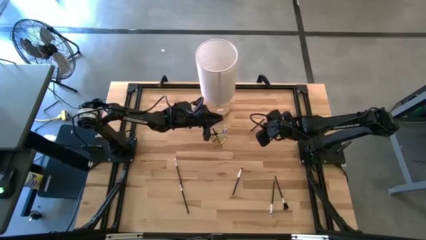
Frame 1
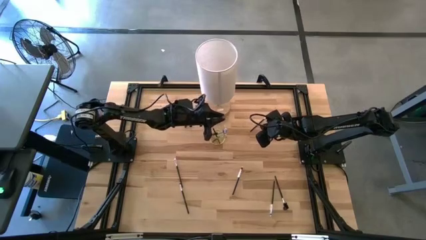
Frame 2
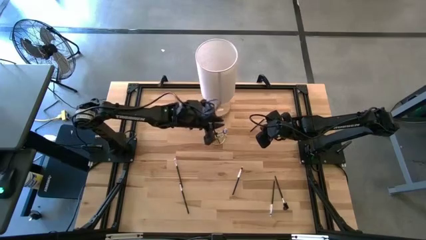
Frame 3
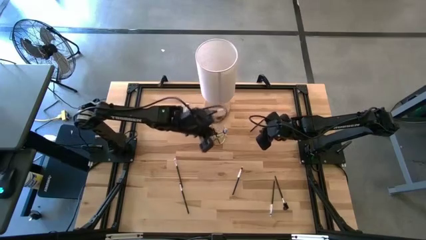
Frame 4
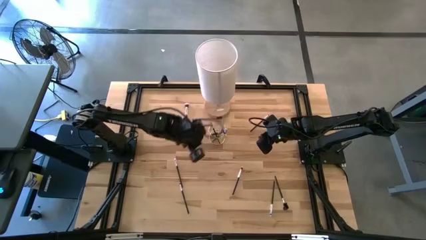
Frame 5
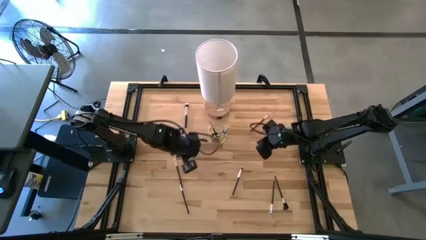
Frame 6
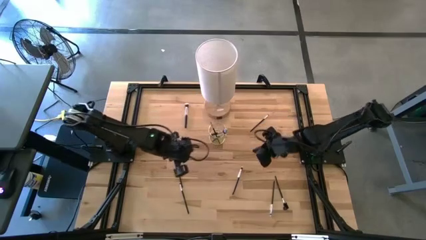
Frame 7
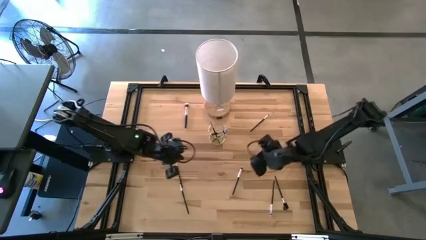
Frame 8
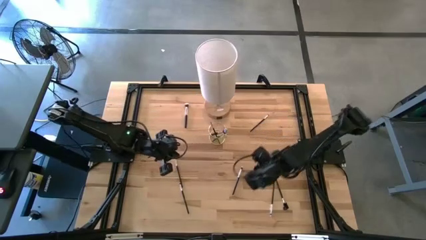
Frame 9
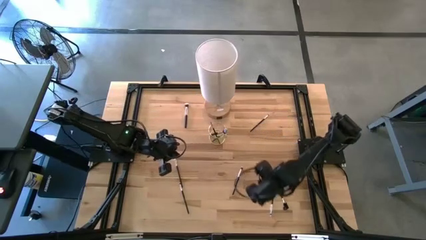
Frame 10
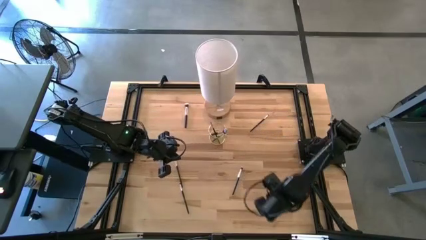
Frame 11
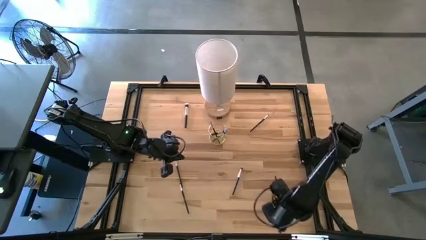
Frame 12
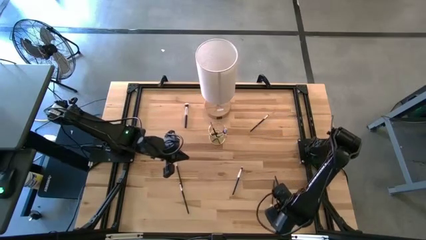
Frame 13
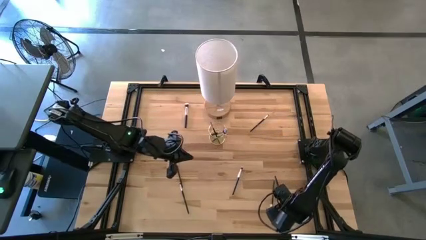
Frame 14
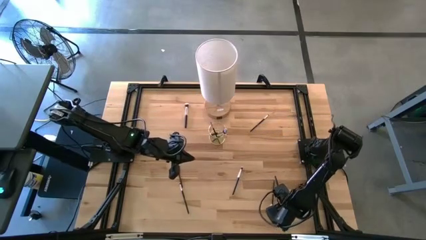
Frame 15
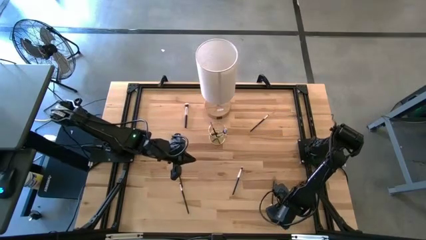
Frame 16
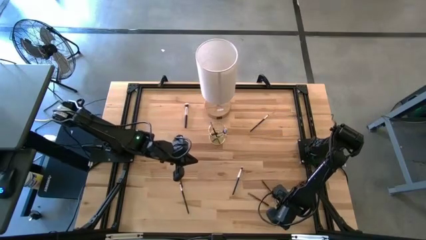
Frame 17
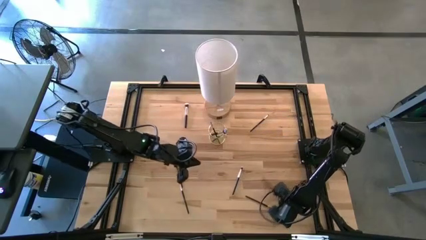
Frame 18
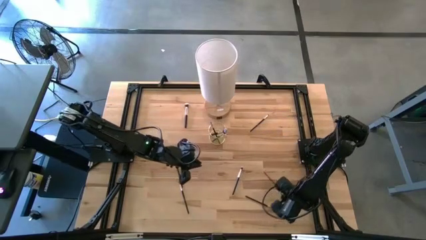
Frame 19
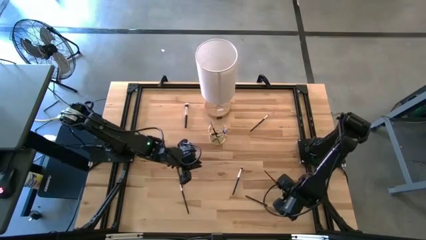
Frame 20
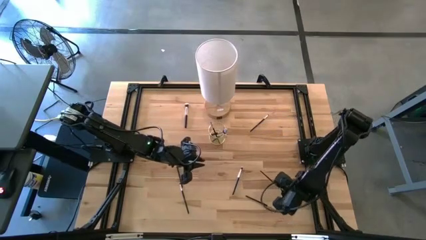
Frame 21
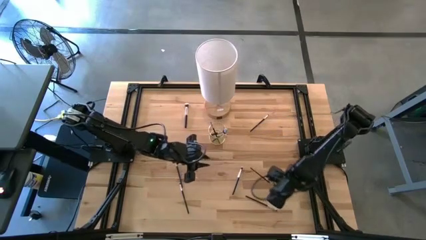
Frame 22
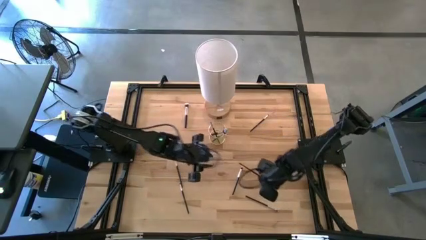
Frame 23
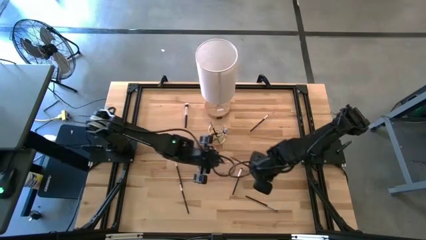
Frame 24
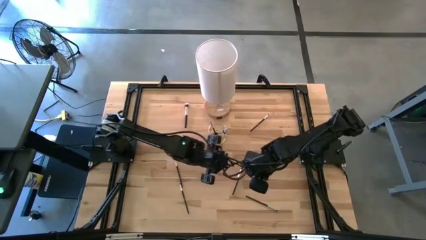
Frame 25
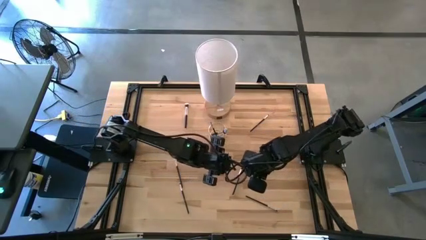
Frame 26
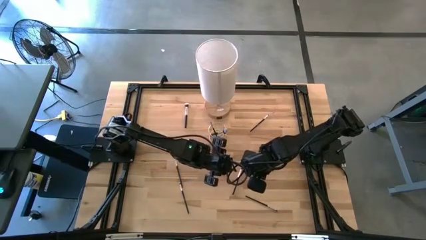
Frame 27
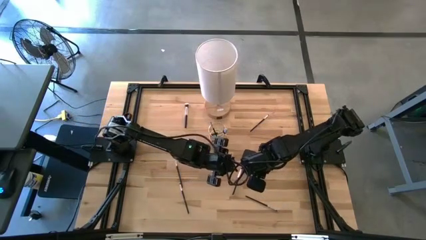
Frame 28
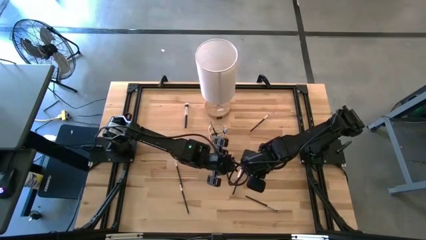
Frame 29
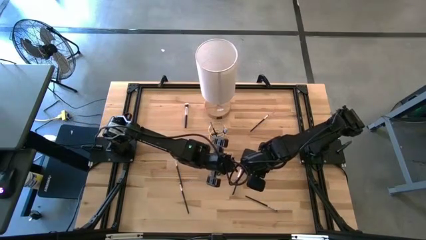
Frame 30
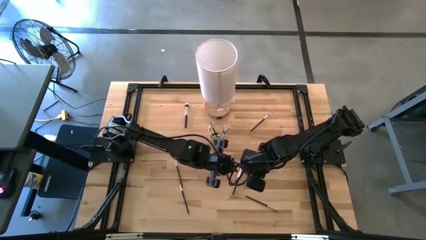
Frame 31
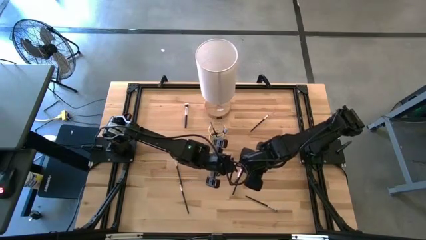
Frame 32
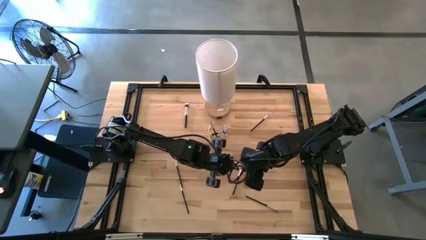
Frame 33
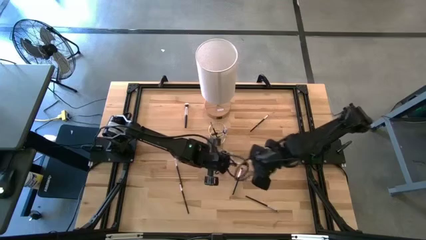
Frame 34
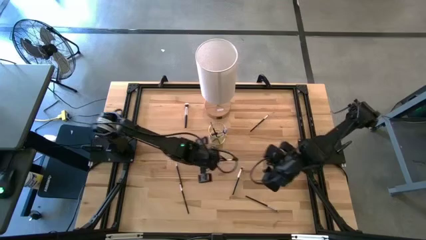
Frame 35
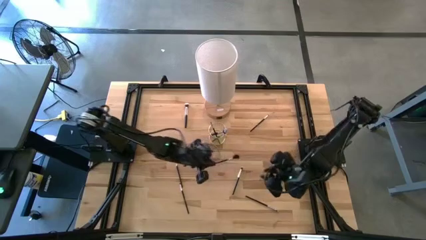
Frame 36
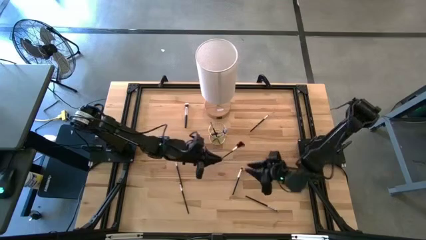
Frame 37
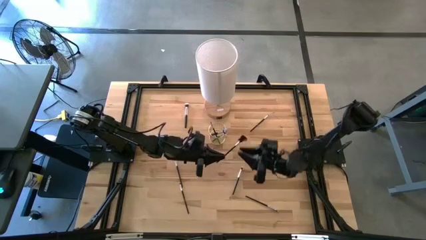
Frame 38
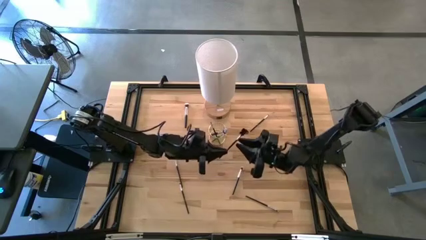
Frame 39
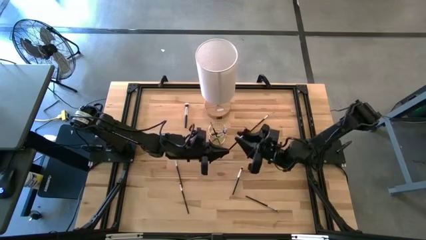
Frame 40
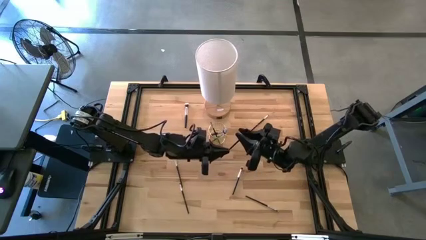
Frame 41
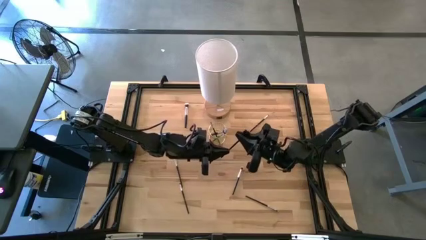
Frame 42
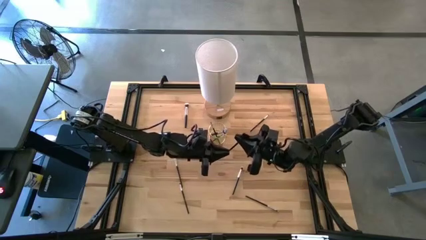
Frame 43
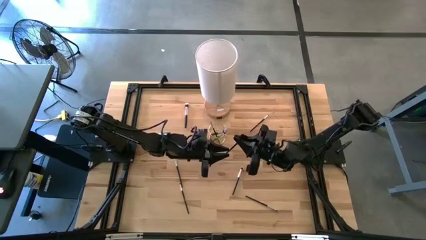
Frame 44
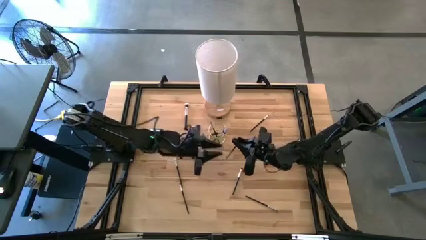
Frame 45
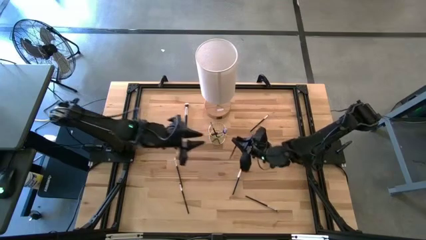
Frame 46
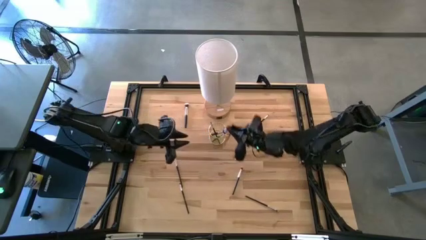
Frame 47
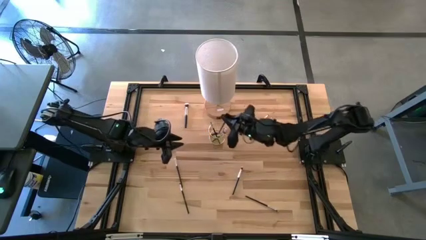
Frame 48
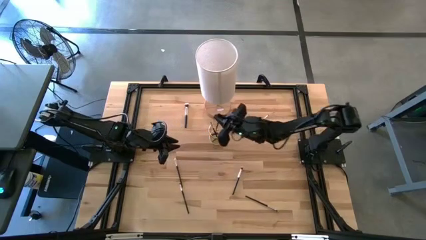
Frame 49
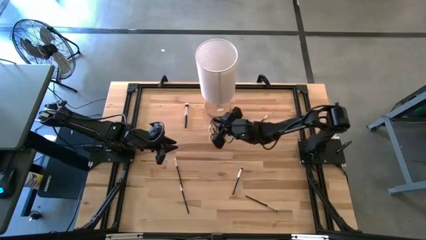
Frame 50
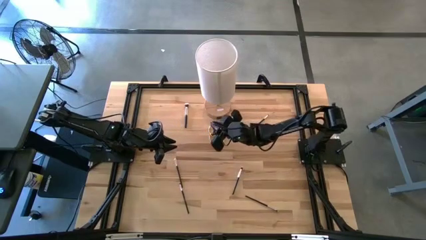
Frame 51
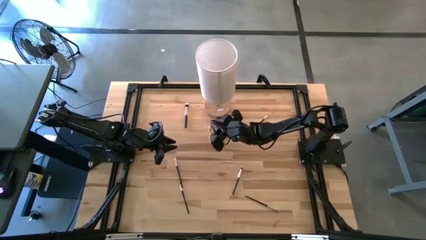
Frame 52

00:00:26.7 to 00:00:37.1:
Task: Put items in baskets/containers
Put the black brow brush into the gold pen organizer

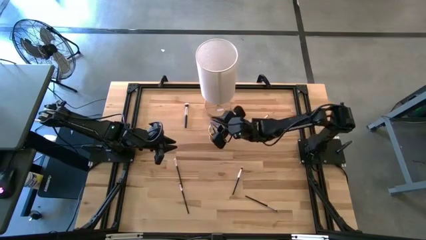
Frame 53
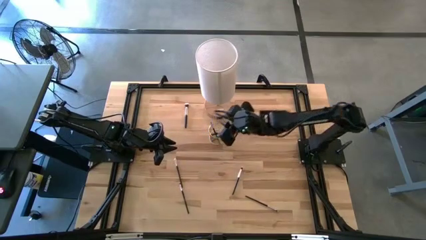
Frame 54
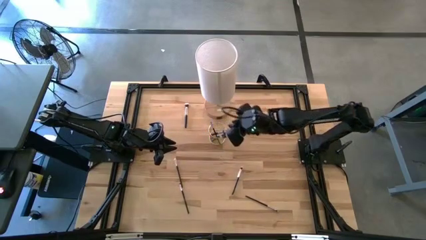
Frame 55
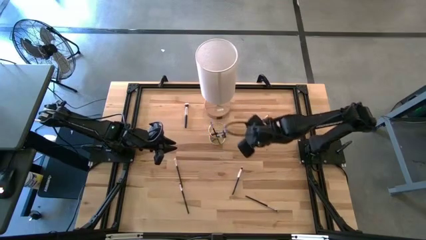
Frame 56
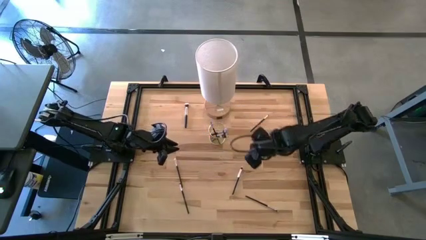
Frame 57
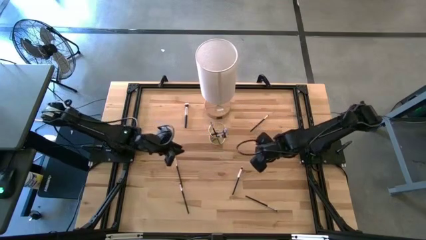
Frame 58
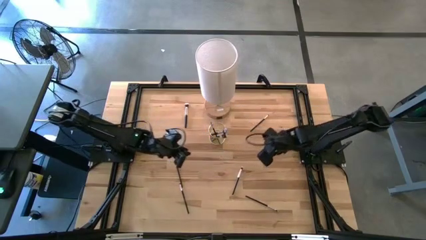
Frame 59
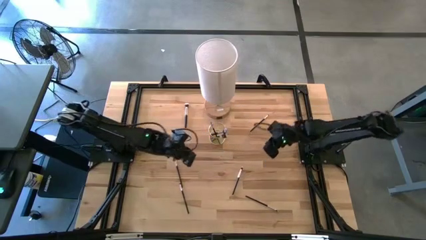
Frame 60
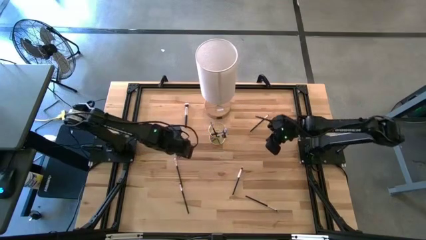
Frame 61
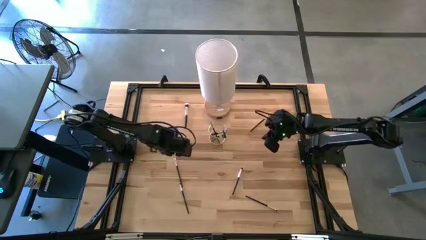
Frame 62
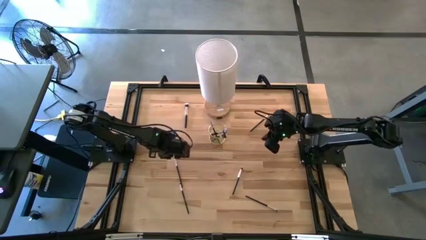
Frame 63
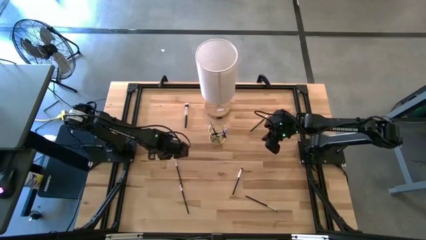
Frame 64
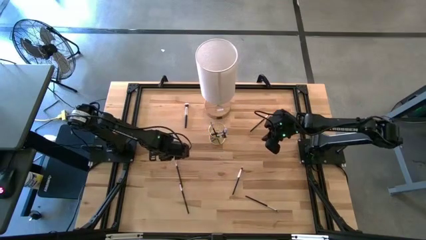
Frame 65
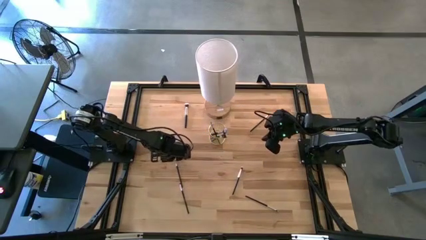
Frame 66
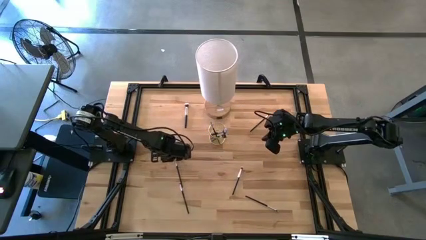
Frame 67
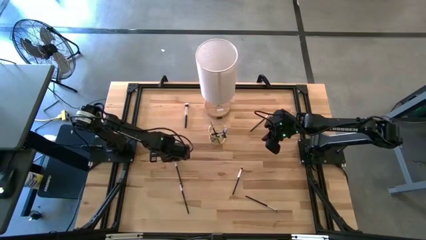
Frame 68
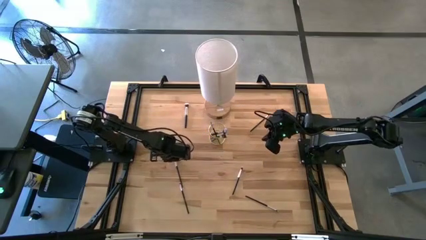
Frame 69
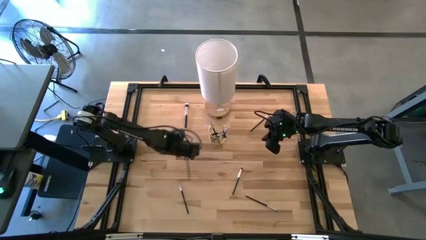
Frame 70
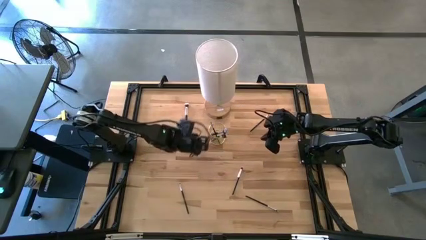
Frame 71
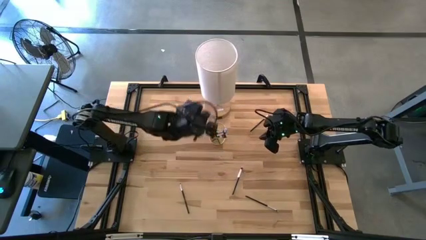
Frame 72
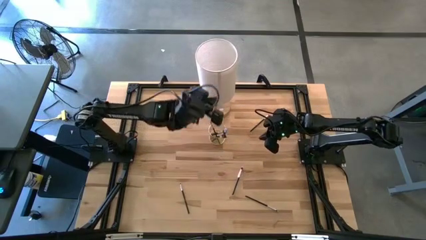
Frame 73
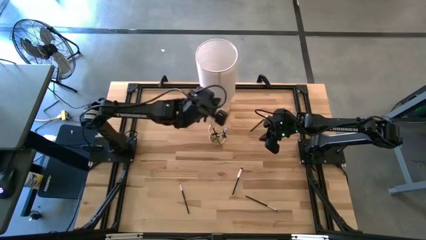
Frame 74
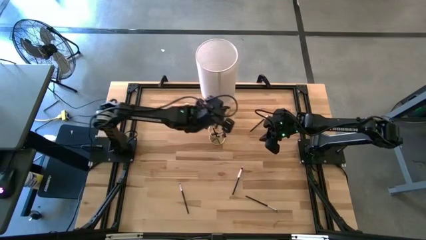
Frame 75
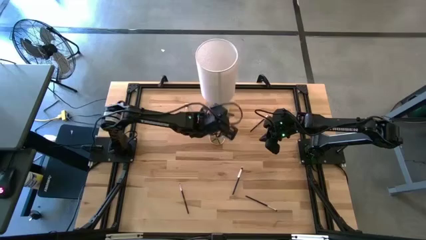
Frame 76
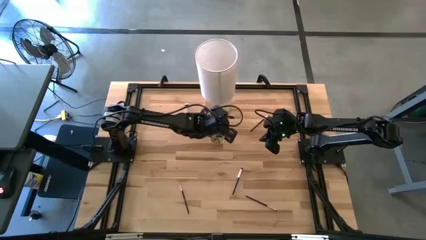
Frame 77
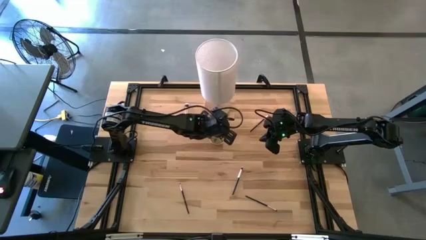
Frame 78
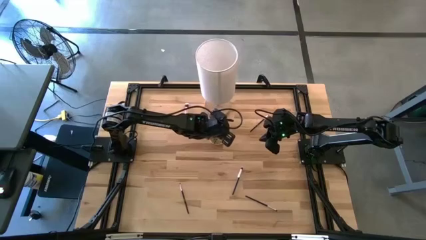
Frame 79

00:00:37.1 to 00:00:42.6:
Put the black eyeshadow brush into the gold pen organizer
